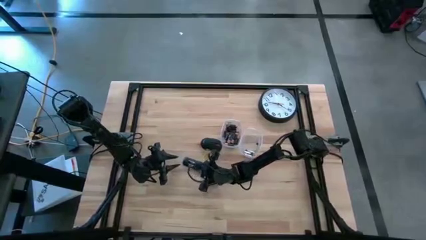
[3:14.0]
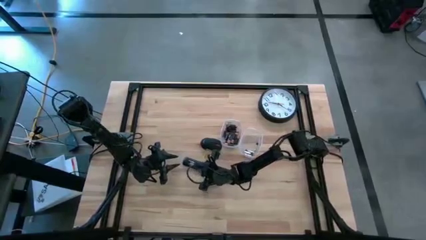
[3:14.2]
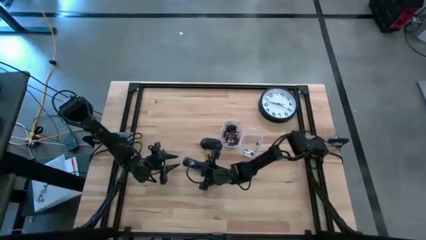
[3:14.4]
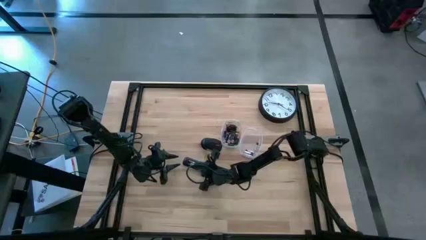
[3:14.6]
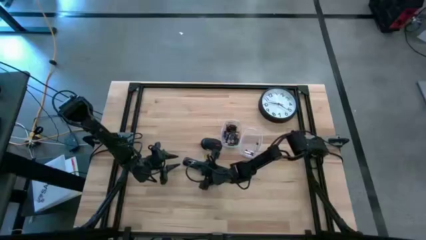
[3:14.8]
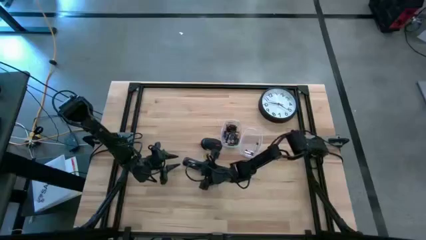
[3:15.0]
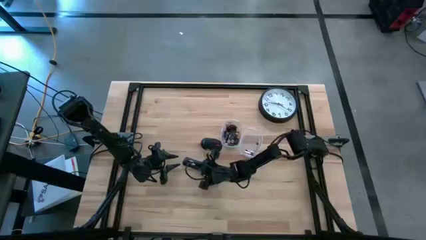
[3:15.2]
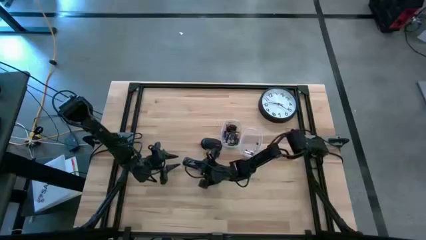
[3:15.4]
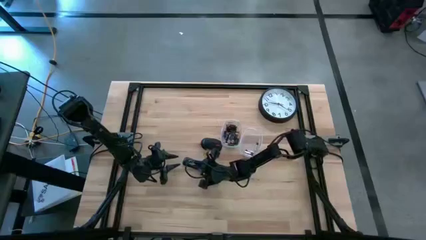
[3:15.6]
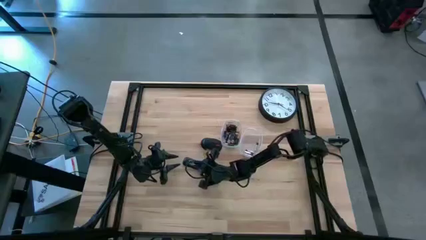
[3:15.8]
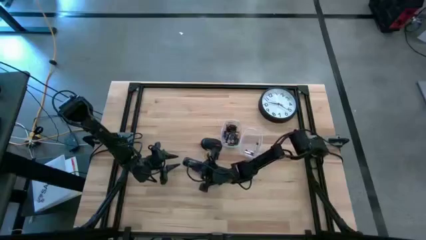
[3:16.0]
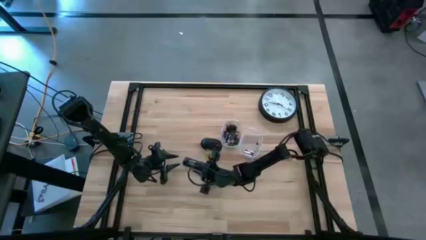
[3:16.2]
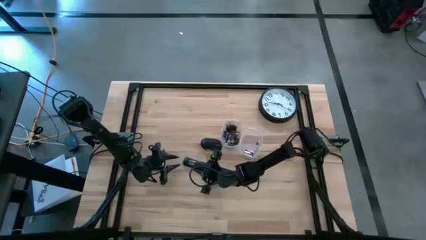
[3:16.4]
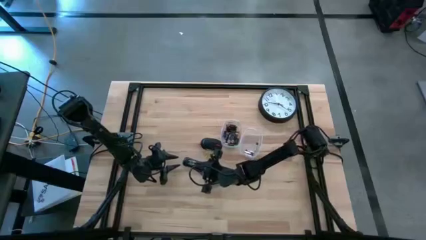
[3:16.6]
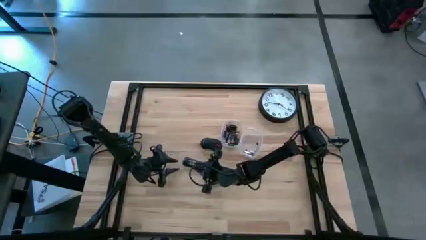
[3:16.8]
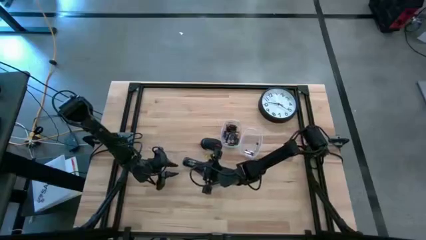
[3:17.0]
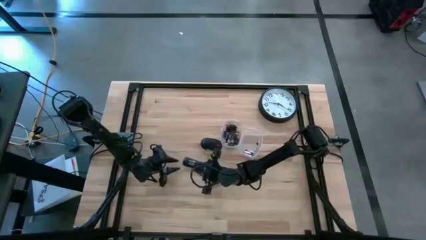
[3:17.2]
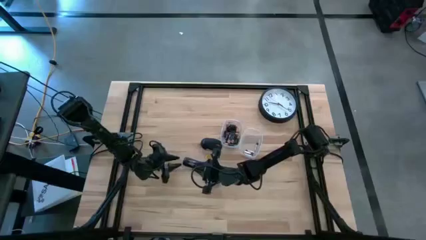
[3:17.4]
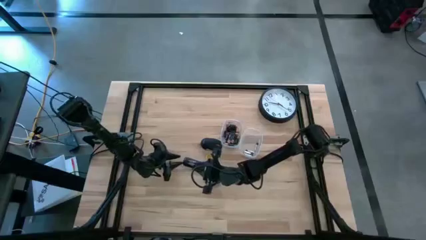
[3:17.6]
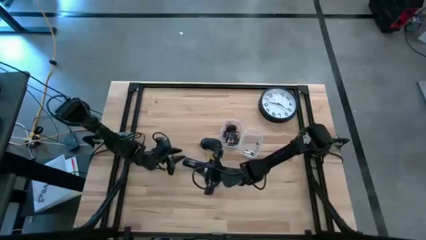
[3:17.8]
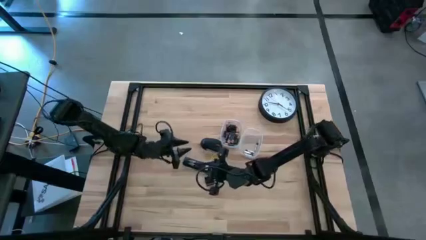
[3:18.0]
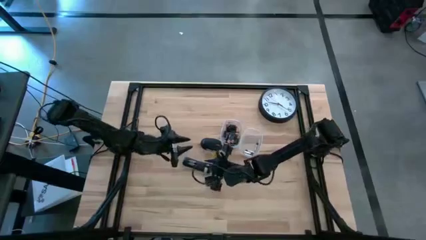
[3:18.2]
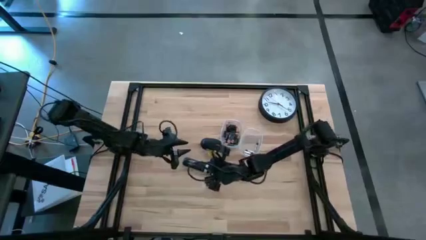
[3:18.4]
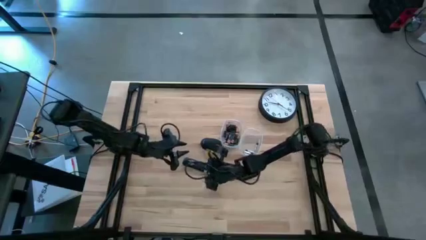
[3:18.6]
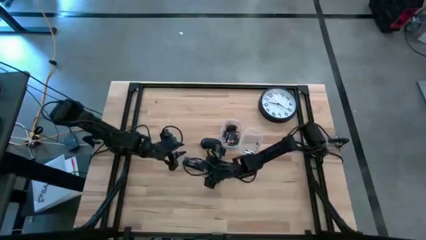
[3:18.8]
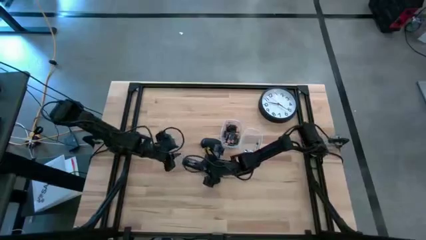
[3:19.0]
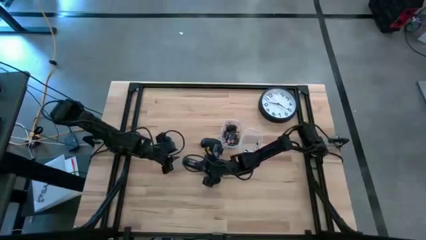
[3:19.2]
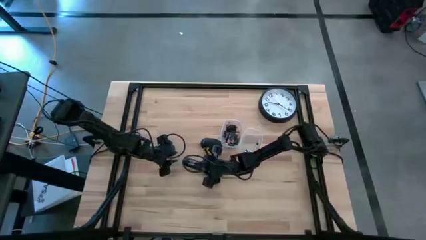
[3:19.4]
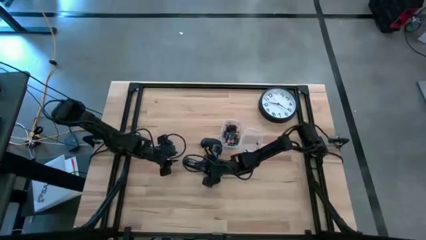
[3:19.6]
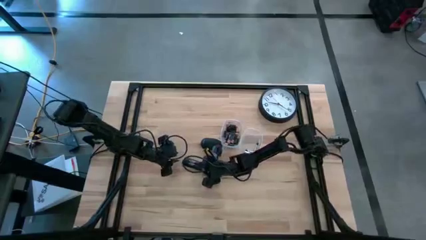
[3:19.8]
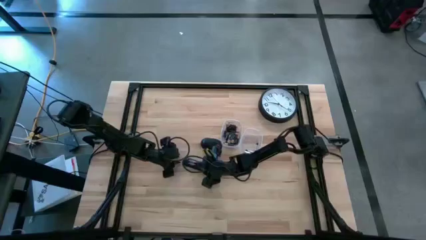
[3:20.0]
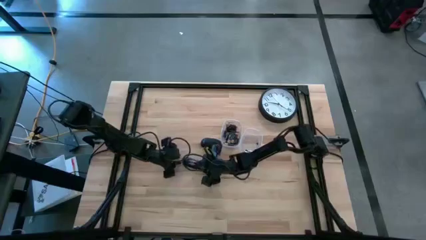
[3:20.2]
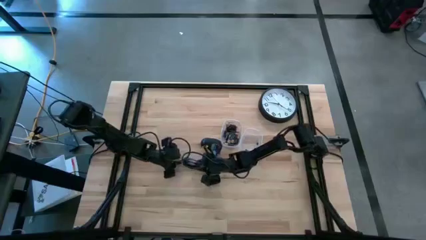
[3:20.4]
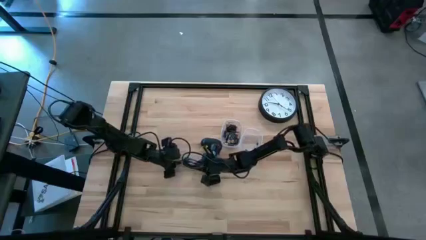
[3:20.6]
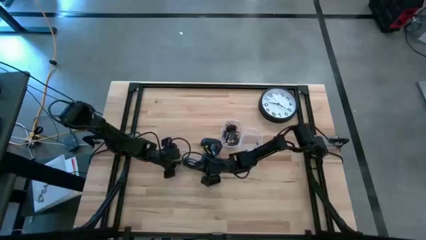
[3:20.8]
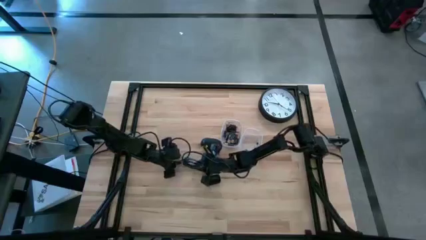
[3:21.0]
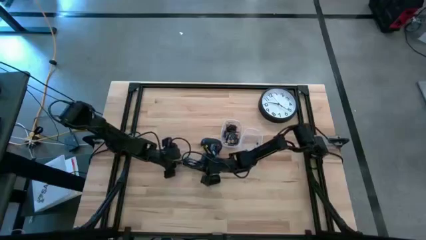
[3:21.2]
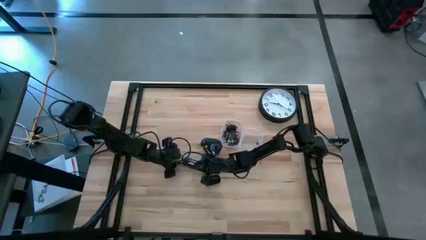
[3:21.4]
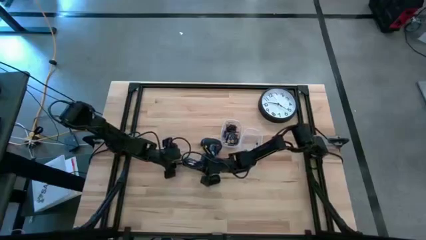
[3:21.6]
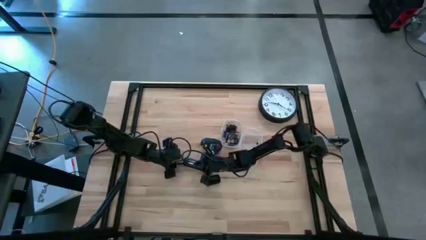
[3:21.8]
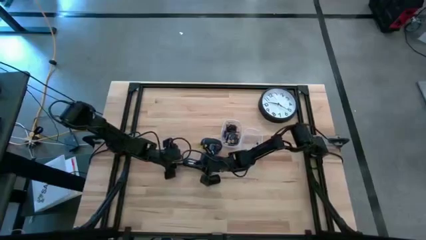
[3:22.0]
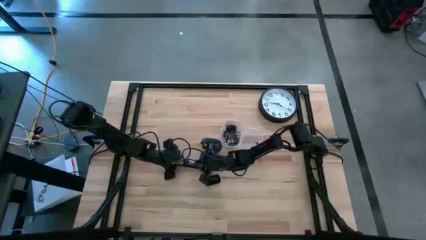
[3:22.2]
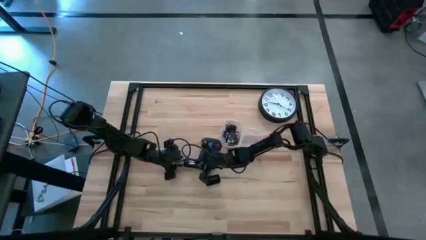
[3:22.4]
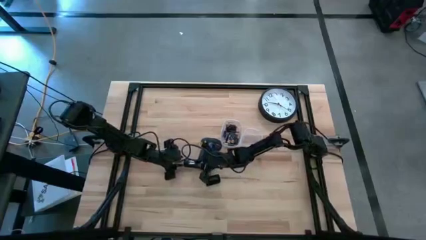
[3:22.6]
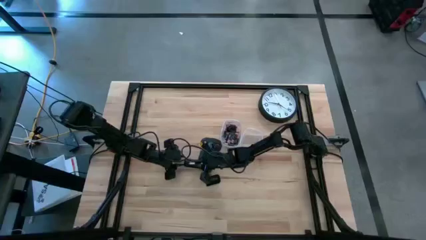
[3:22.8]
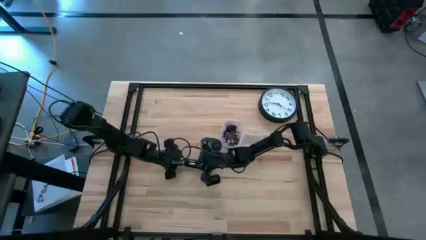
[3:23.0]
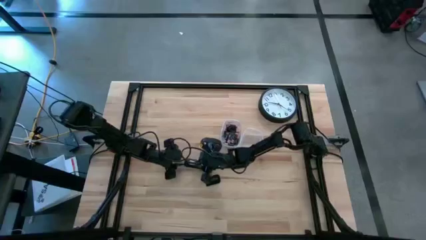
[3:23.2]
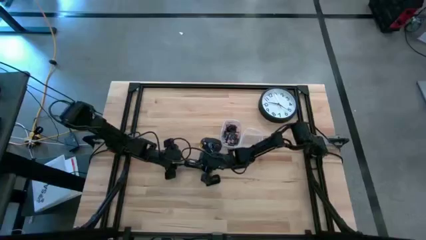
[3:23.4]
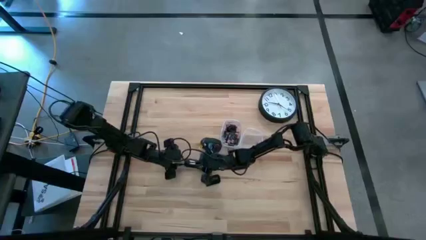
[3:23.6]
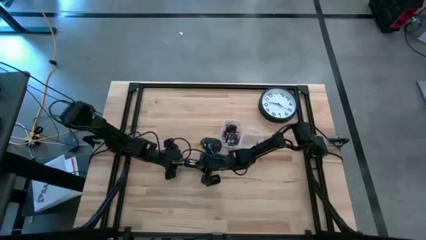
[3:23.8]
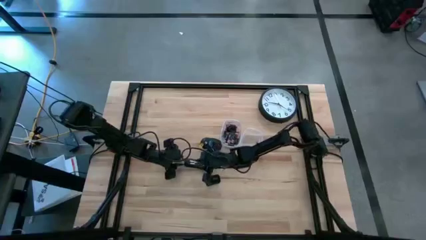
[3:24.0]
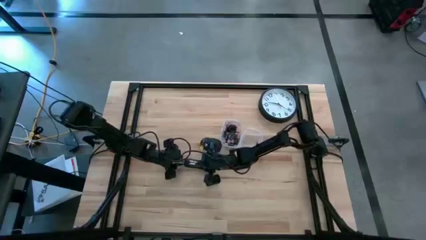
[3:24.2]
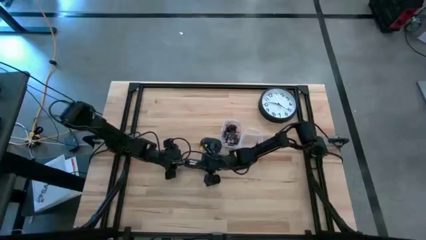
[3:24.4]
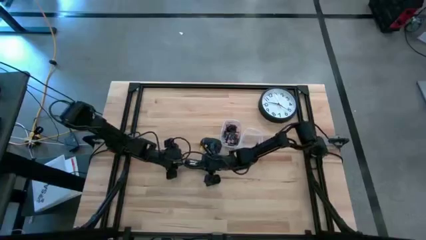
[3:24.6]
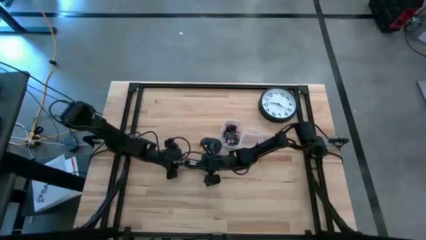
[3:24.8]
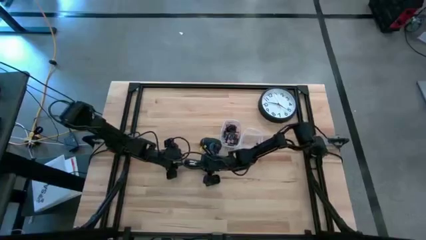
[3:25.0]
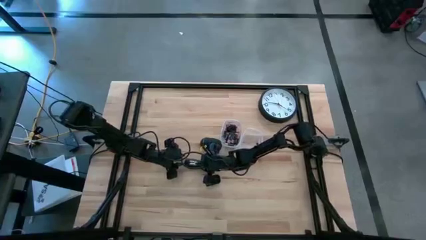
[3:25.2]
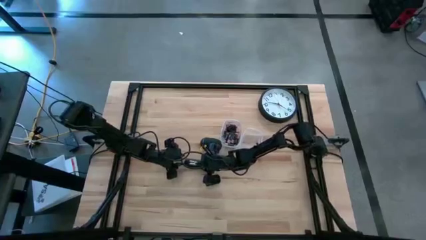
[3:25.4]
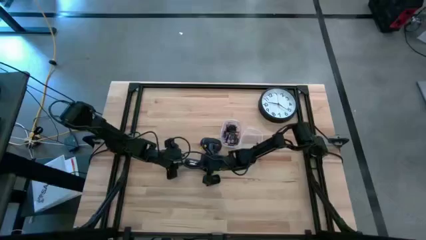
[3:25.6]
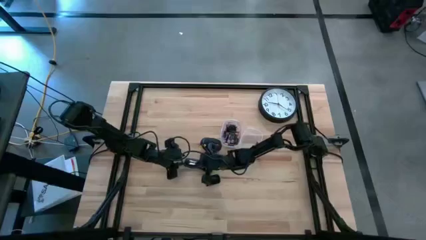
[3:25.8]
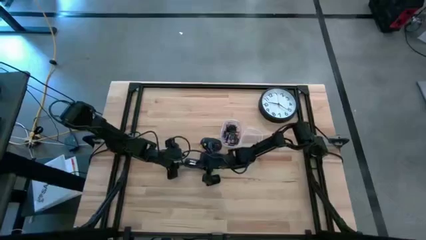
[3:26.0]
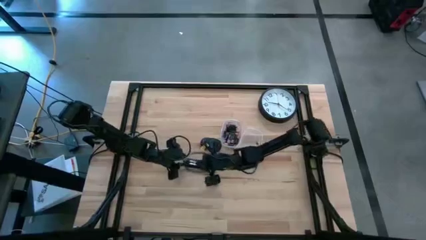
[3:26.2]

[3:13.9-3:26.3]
Task: Insert battery
Insert the silver battery into the remote battery compartment

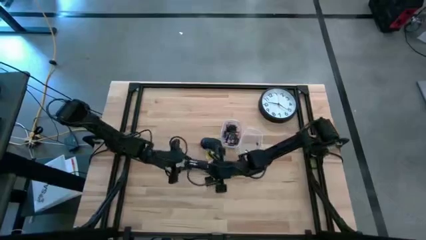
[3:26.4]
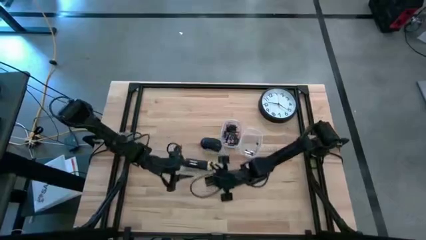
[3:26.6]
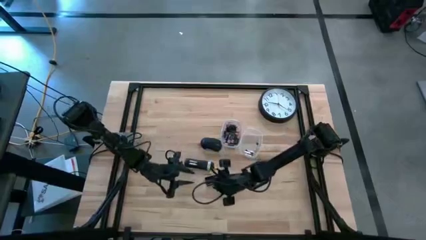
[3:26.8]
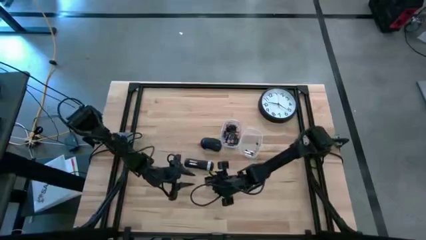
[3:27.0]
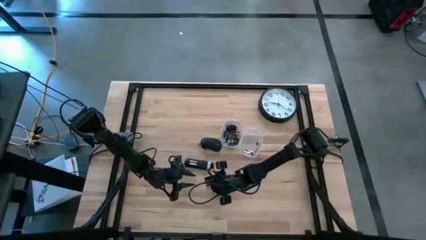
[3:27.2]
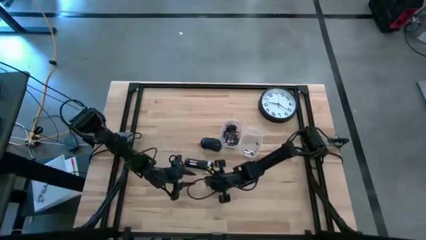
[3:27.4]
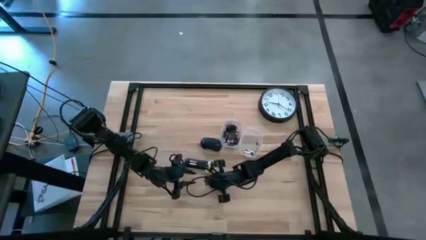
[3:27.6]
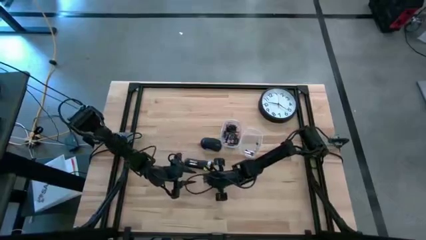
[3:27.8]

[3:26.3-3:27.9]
Close the black cover

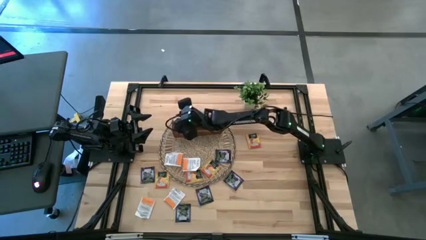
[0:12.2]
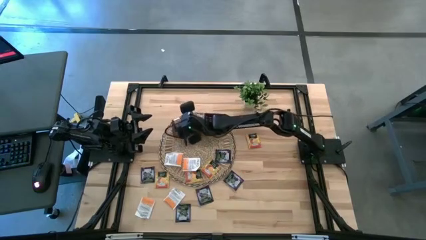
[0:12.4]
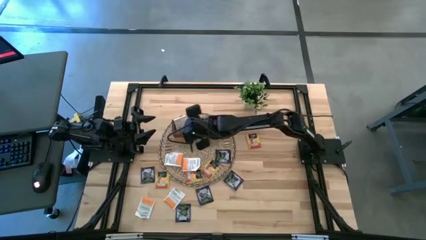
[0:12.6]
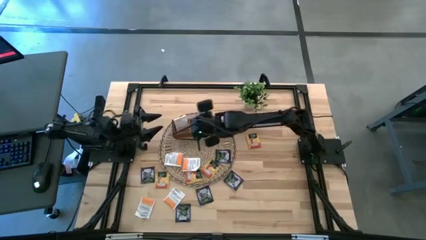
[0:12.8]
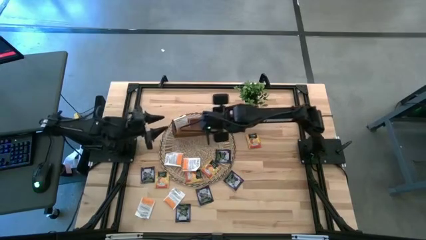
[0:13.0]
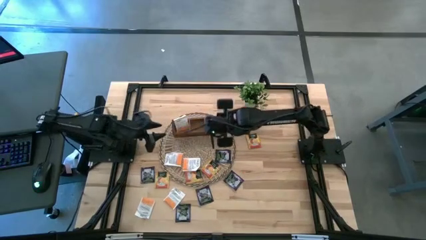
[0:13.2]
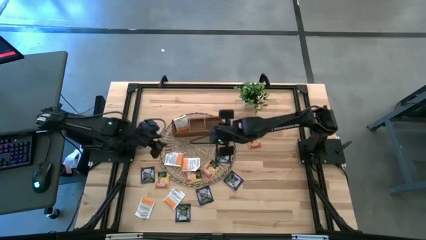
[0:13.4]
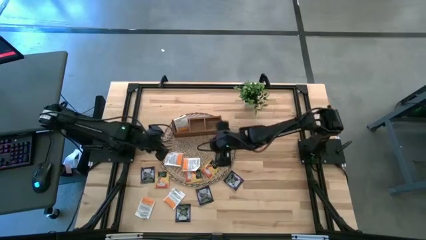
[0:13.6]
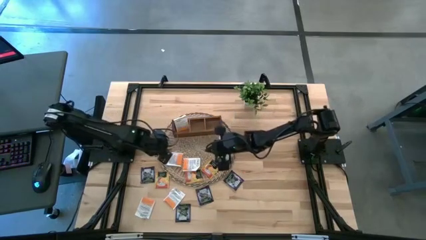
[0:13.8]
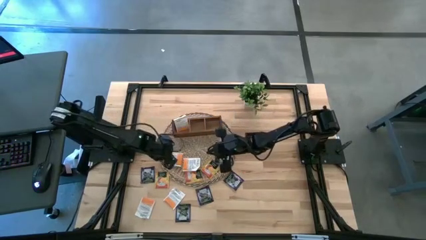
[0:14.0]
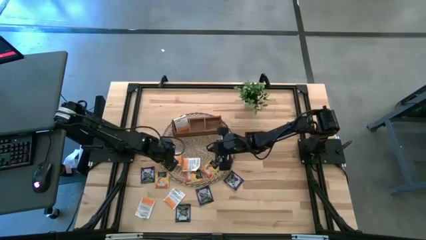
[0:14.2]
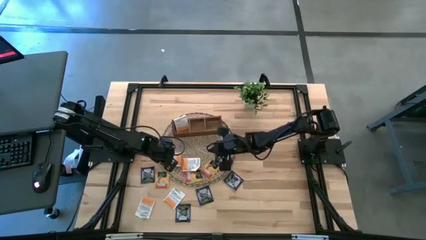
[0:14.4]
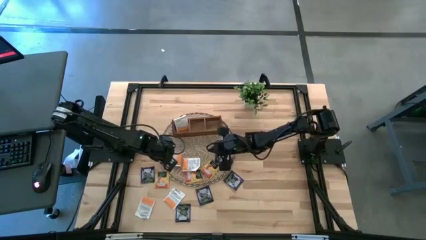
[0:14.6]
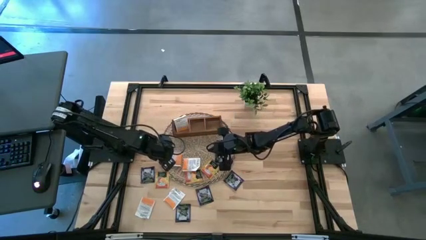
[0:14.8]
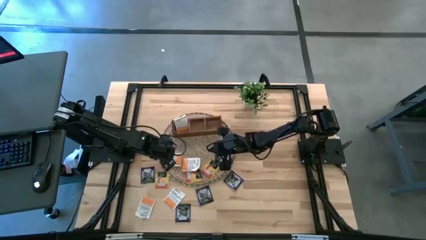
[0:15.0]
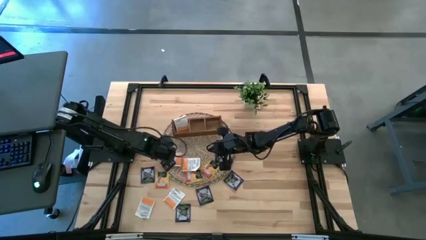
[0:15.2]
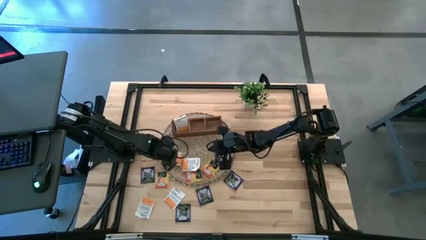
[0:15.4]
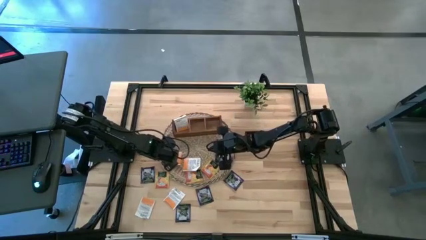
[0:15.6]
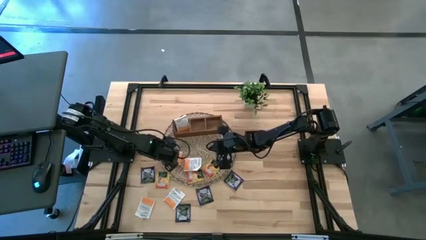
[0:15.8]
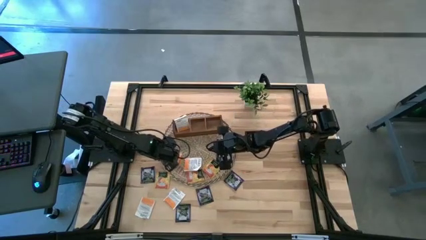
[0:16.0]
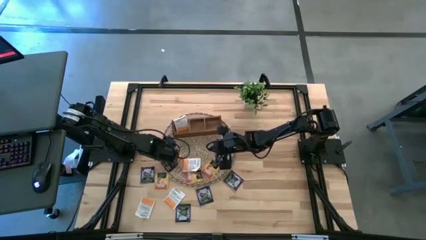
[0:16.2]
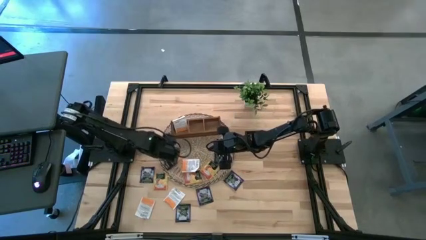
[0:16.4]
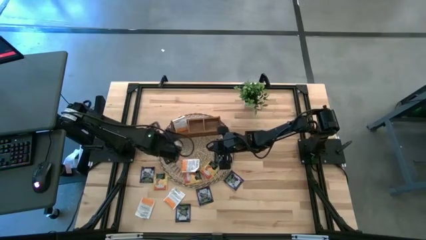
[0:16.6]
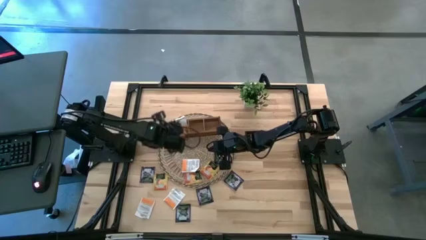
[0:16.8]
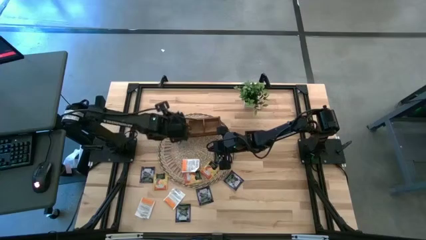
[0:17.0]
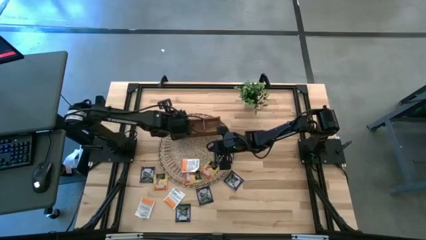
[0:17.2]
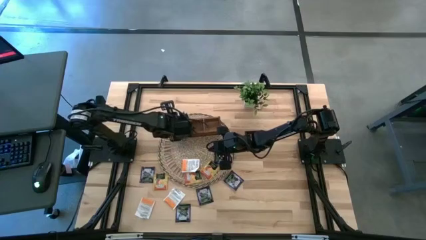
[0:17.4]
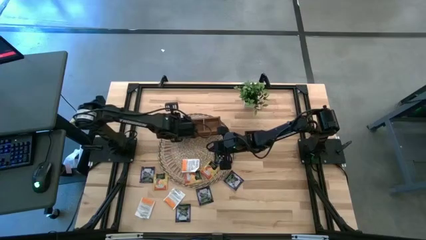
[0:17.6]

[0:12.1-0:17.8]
Task: Pick & Place Tea
Put the white tea packet into the left compartment of the wooden organizer
